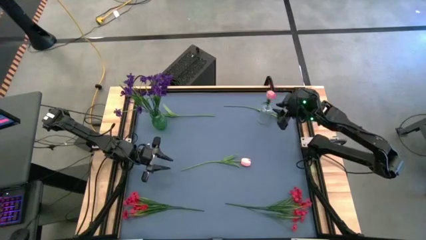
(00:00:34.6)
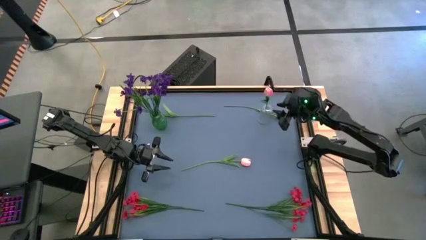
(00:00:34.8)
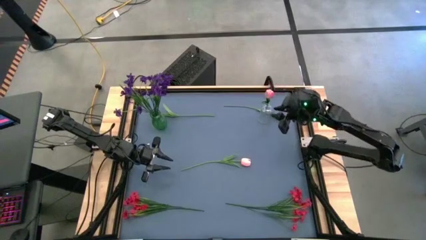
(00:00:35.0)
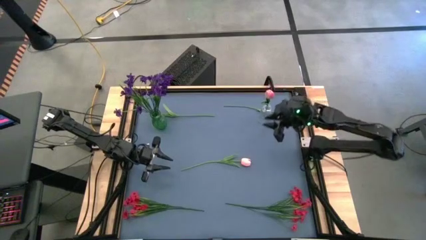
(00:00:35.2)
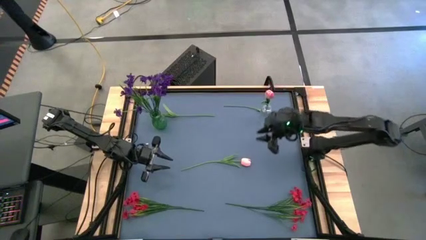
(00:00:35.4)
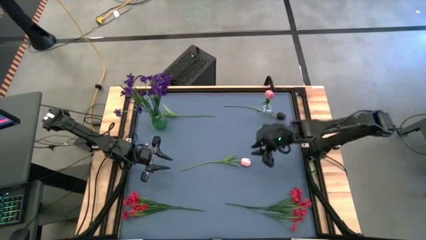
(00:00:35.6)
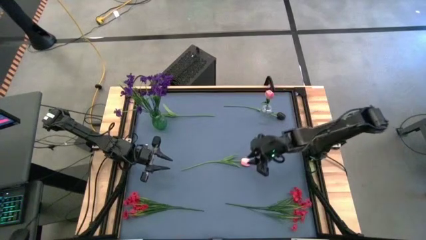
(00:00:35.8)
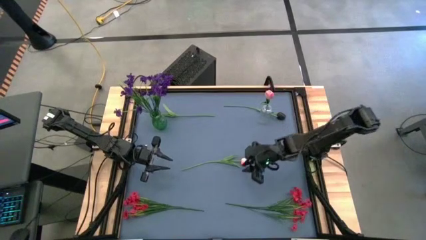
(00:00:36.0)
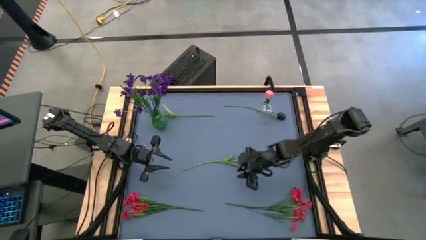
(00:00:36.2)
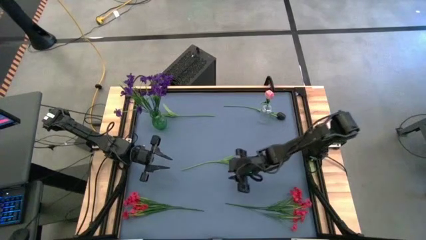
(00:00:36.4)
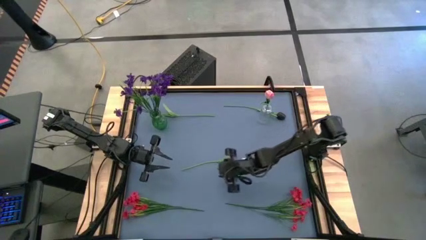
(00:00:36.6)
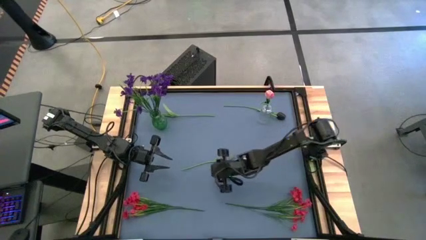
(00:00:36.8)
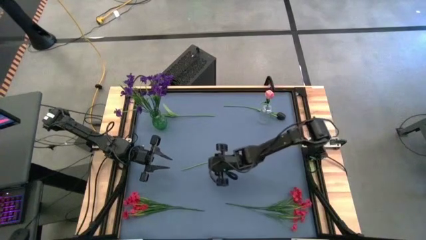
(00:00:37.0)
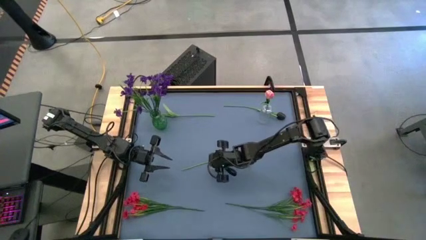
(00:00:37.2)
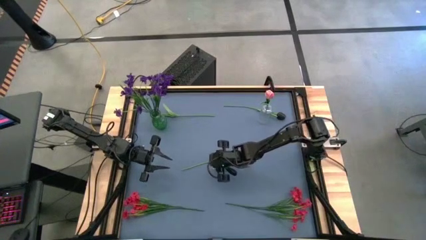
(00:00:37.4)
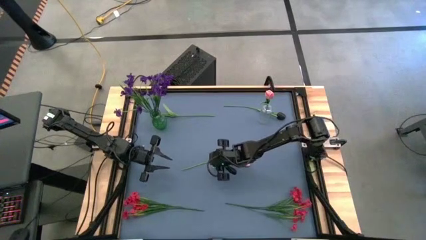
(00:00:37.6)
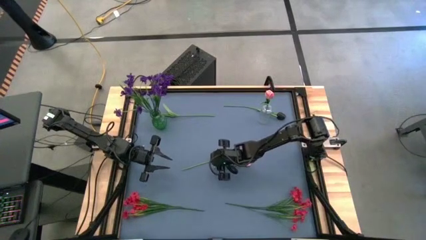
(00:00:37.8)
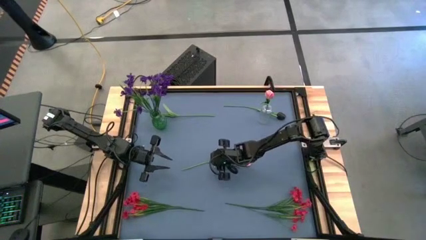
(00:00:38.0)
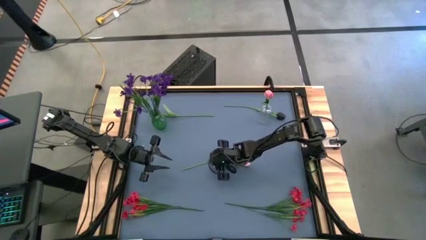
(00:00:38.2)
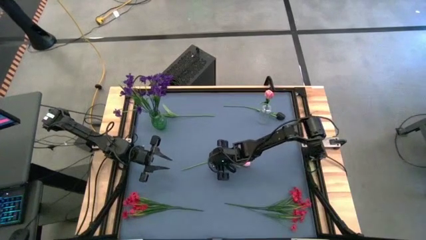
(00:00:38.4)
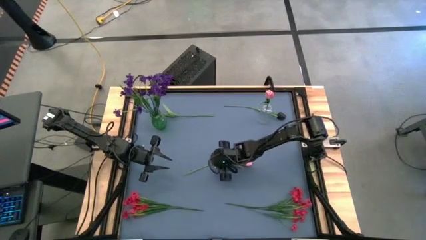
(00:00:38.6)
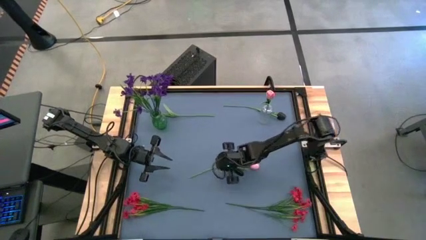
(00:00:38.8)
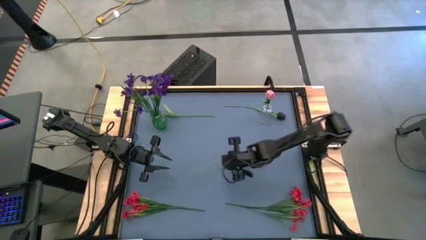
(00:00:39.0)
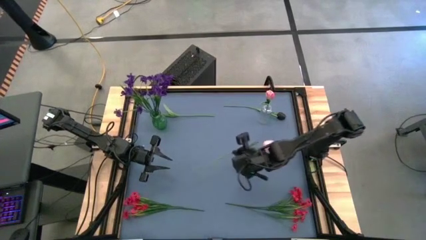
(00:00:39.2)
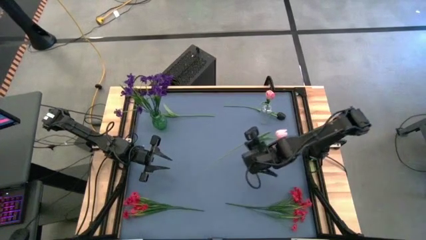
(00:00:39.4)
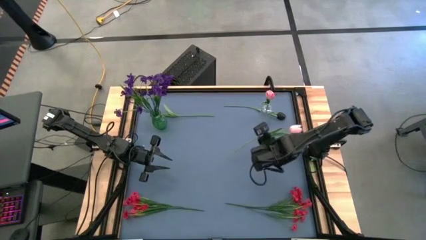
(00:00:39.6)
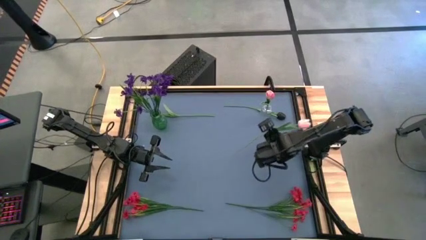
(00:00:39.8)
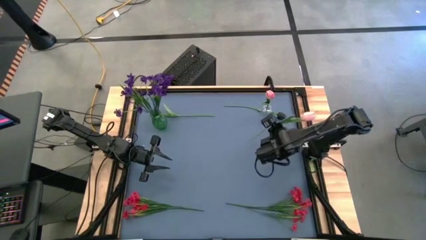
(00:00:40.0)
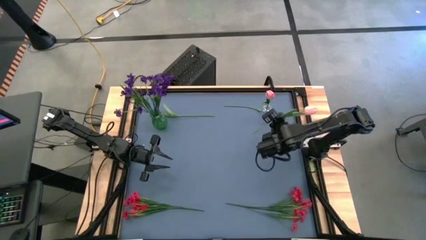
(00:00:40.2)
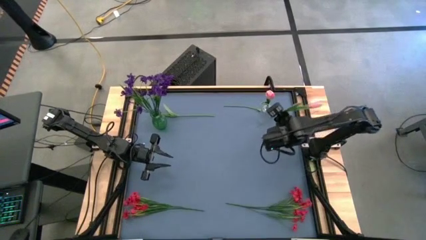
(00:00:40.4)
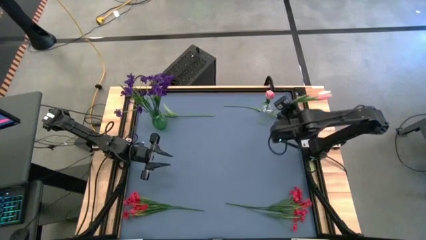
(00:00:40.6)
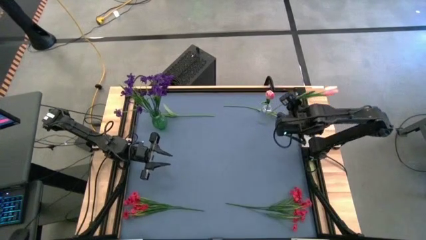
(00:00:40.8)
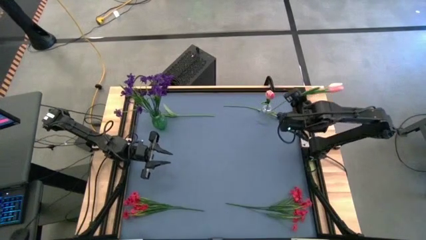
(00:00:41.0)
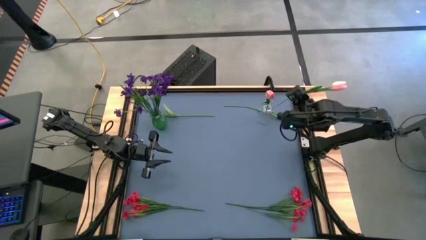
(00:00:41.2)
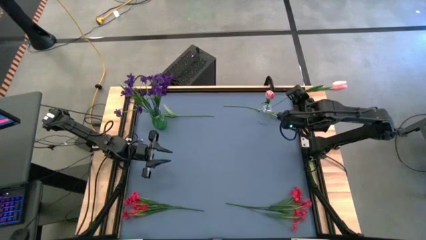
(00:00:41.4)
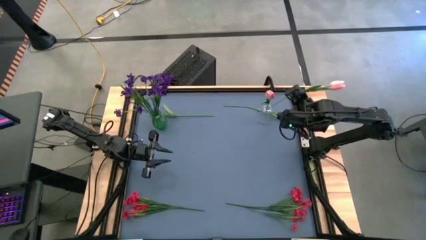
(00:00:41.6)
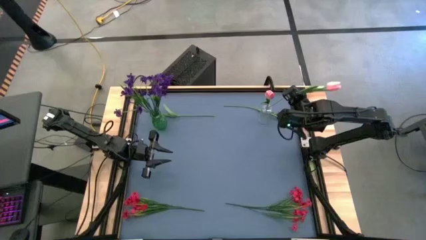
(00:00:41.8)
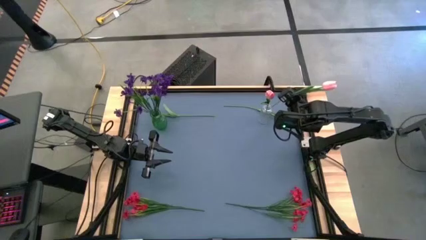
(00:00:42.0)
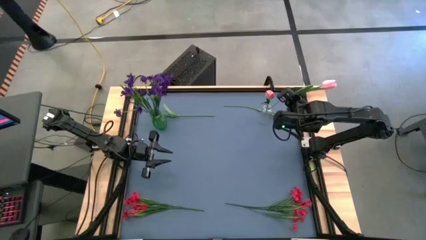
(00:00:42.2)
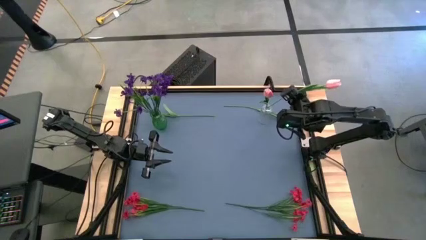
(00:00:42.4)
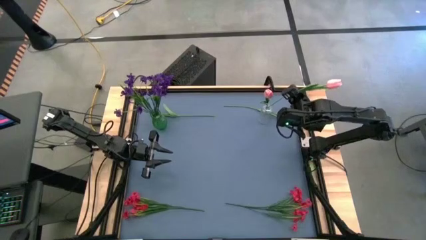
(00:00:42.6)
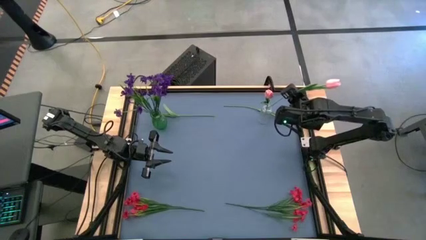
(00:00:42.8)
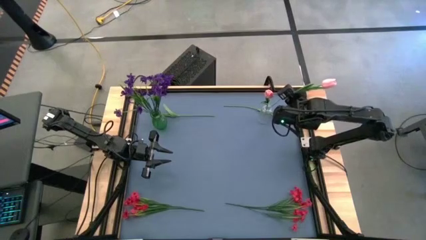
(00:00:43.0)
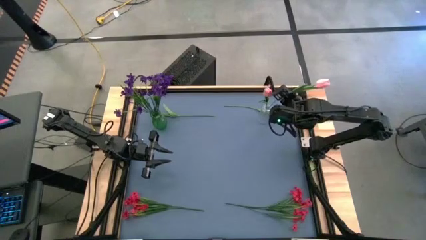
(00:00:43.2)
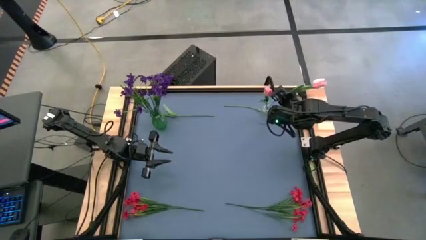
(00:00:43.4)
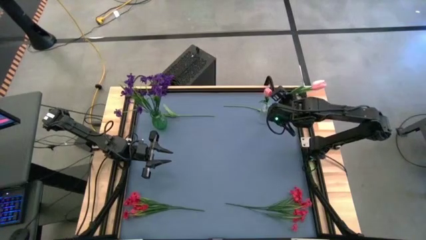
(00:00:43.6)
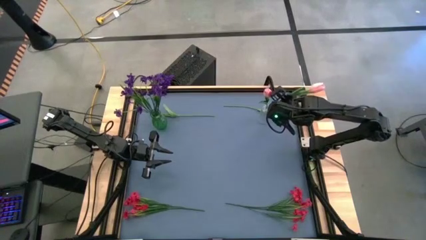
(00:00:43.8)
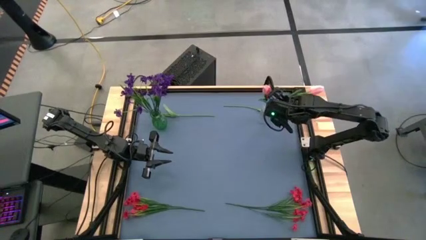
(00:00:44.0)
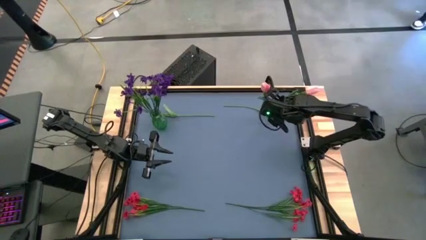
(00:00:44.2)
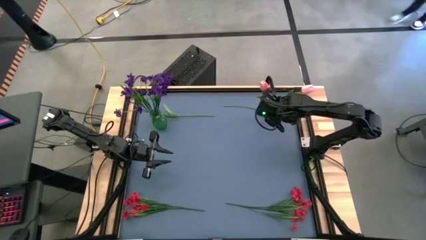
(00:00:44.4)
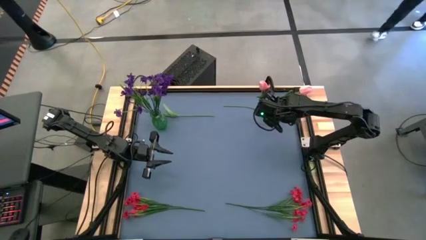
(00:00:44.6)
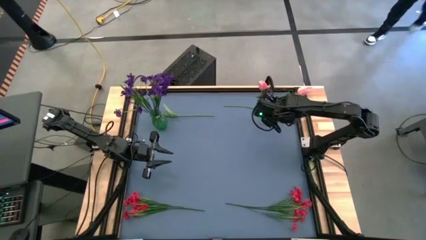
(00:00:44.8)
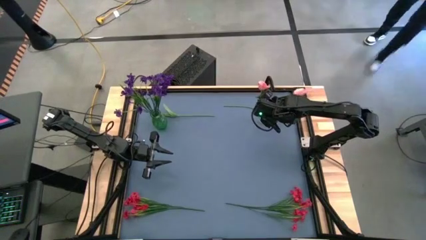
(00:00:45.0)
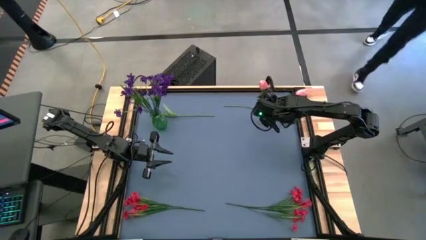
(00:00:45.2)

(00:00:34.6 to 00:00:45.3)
Task: Sort flowers into vase by color
Put the pink flower into the transparent vase

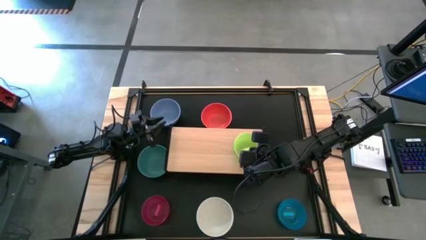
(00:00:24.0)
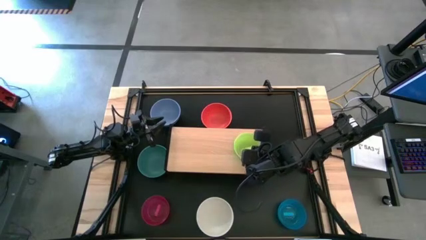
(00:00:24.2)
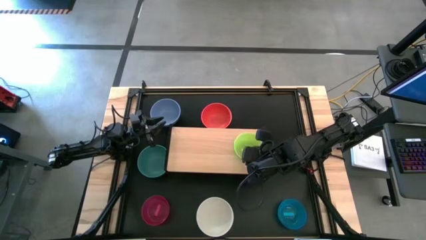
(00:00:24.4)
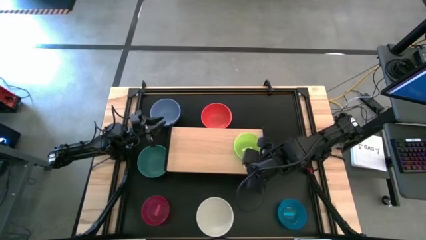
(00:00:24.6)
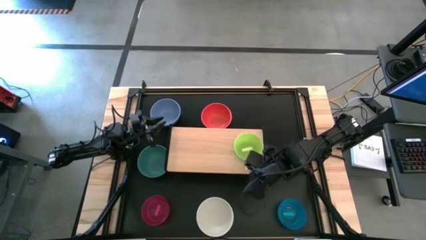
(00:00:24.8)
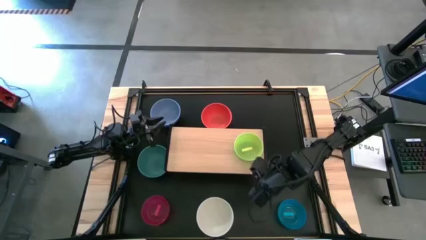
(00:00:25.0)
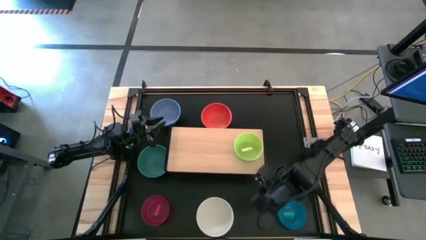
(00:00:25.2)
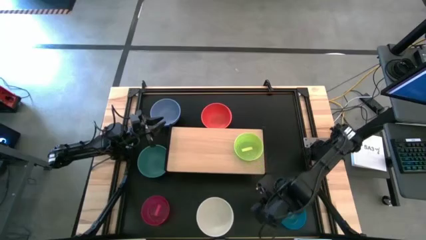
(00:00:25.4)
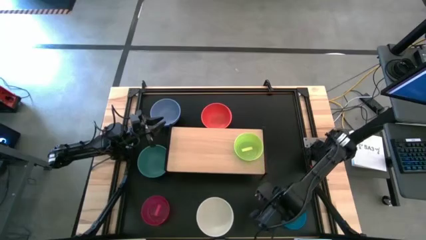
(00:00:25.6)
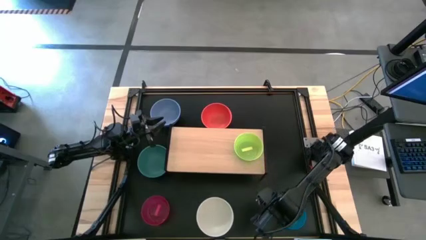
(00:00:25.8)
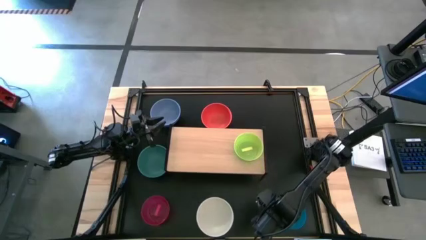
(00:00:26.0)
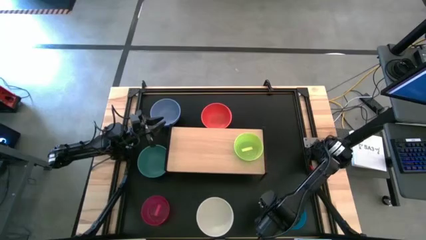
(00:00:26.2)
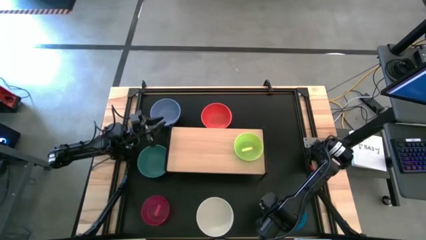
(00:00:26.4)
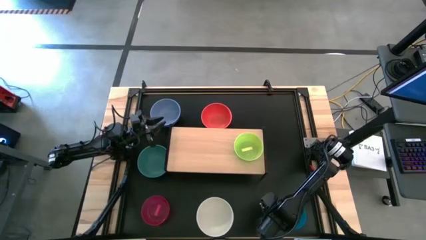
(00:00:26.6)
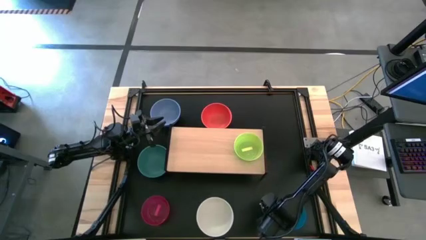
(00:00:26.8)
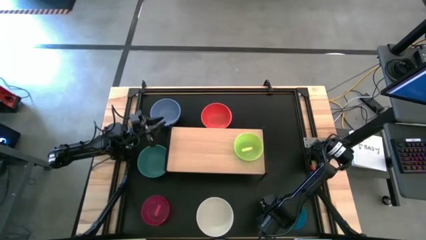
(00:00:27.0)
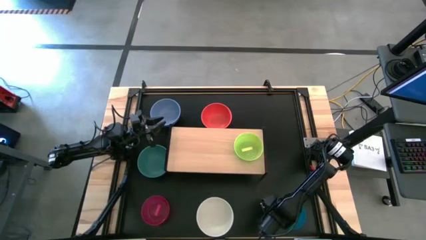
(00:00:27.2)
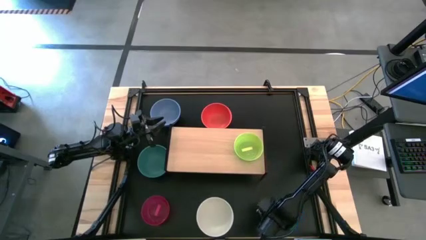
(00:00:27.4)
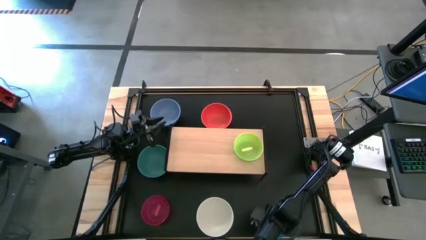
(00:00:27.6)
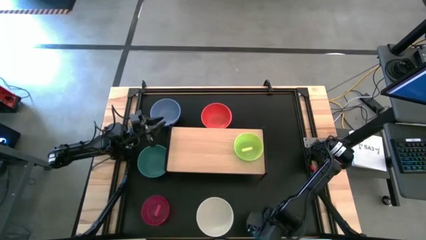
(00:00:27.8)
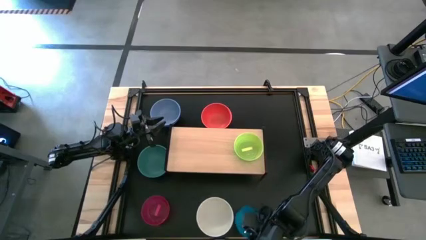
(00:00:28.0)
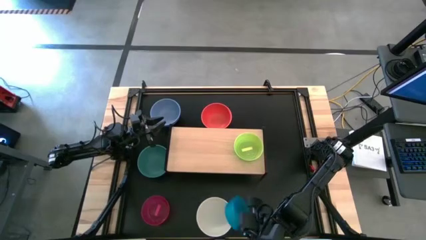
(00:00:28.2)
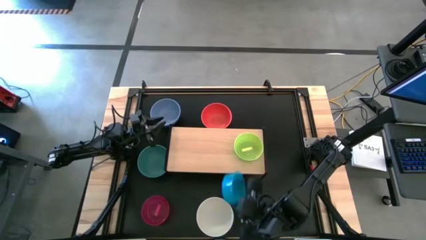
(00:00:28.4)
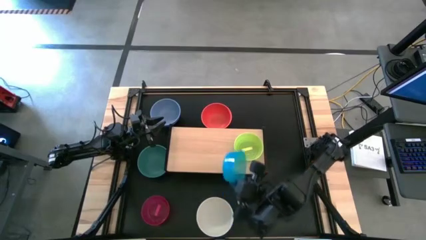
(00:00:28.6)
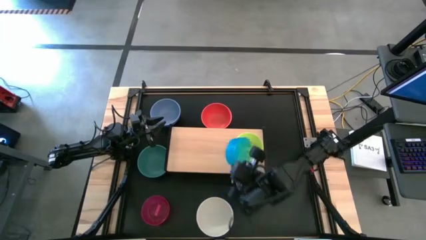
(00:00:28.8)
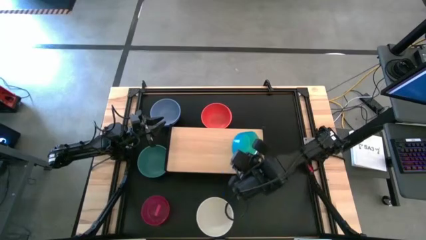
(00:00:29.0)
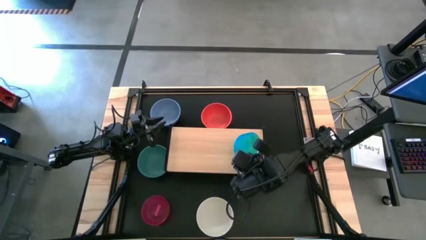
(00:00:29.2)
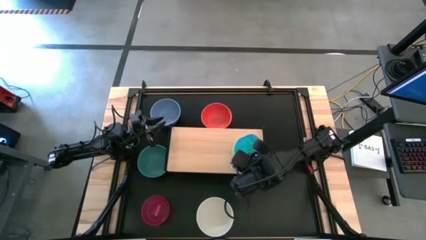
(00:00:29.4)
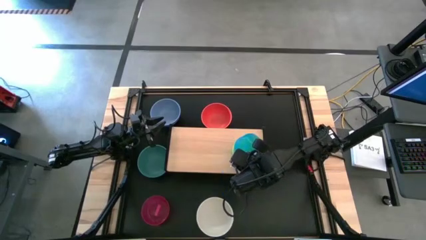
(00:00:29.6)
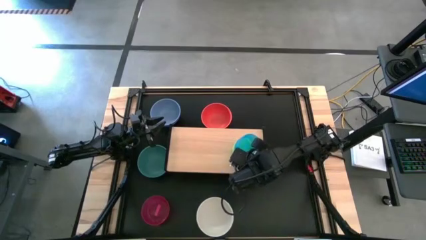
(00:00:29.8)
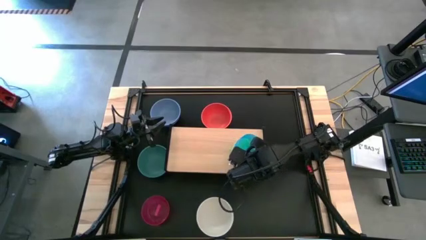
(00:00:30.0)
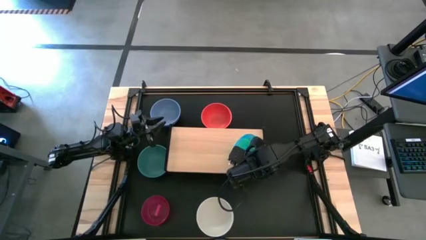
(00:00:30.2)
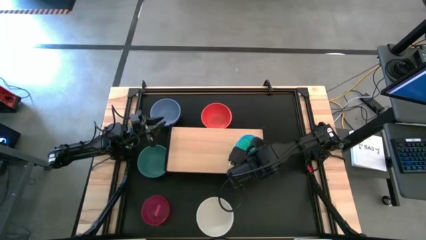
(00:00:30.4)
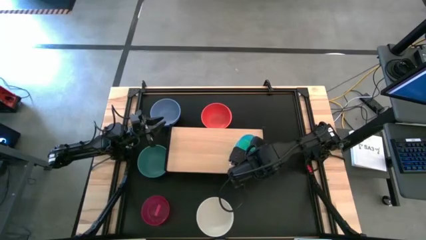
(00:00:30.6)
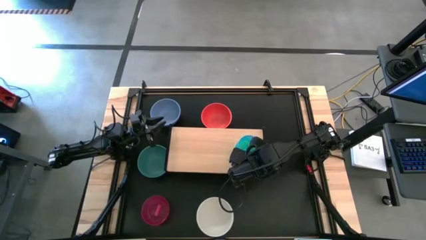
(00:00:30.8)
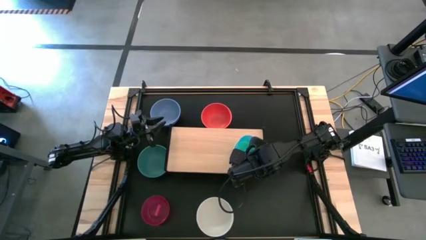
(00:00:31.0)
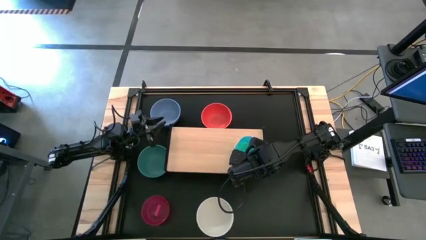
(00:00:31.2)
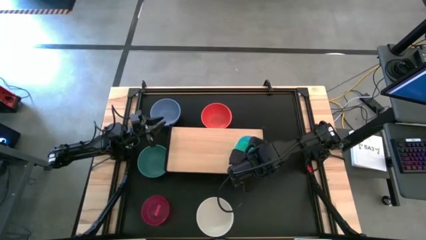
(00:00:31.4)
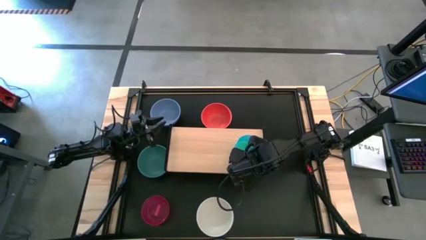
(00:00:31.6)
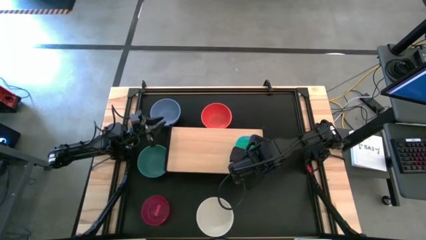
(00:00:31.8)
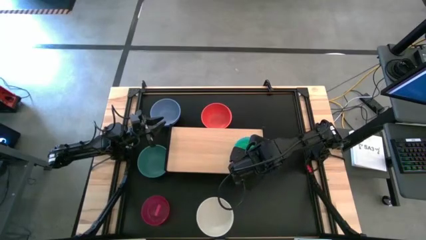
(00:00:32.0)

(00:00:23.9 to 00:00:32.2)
Task: Place and stack bowls onto a shelf
Stack the small blue bowl on top of the small yellow bowl on the shelf
